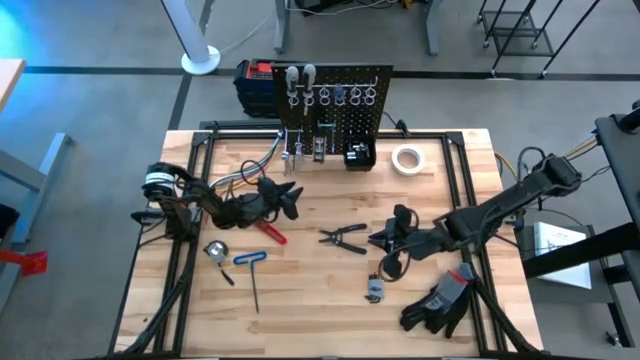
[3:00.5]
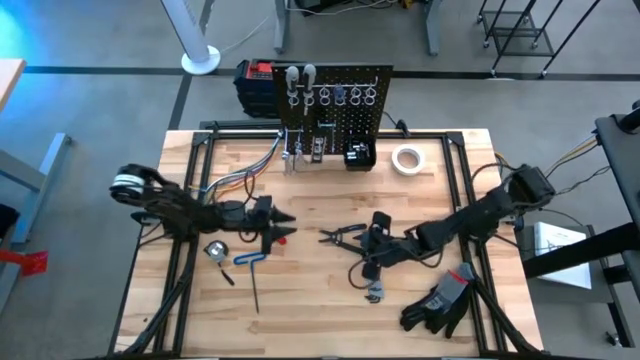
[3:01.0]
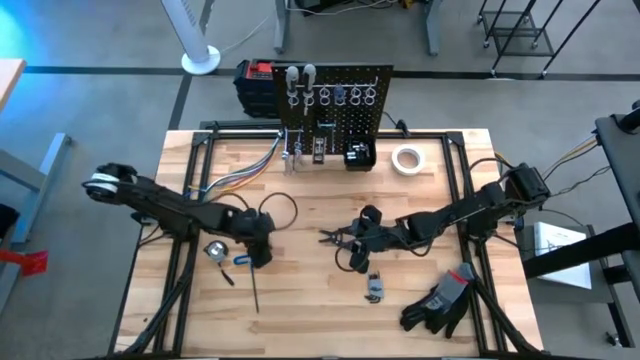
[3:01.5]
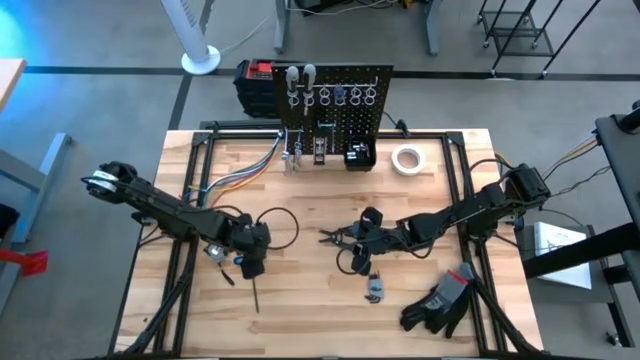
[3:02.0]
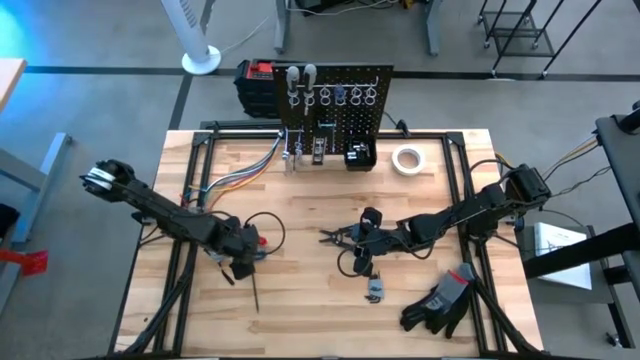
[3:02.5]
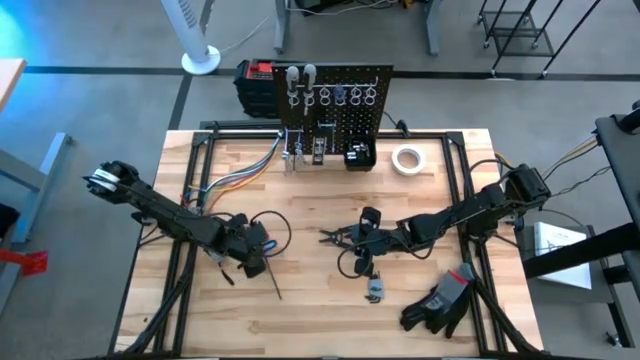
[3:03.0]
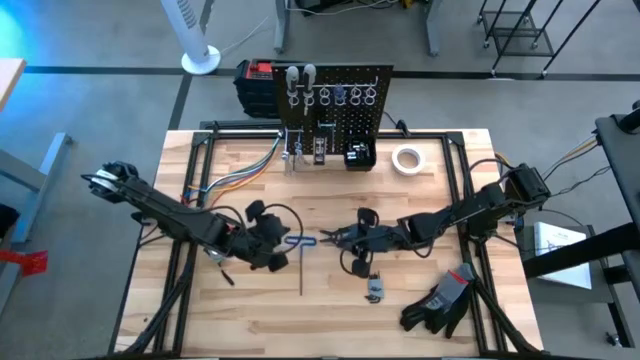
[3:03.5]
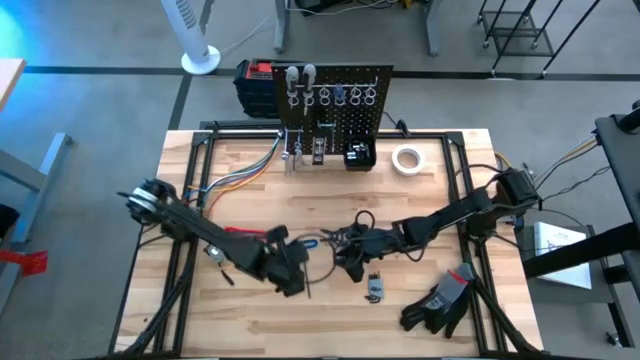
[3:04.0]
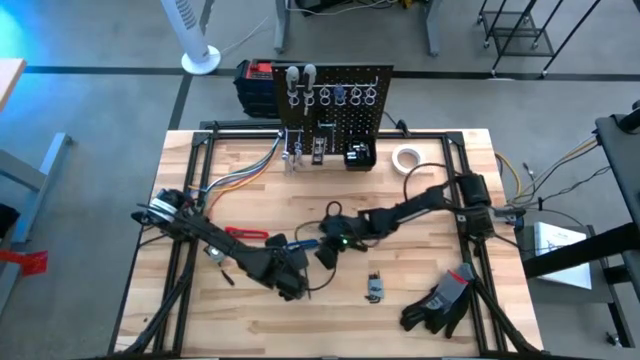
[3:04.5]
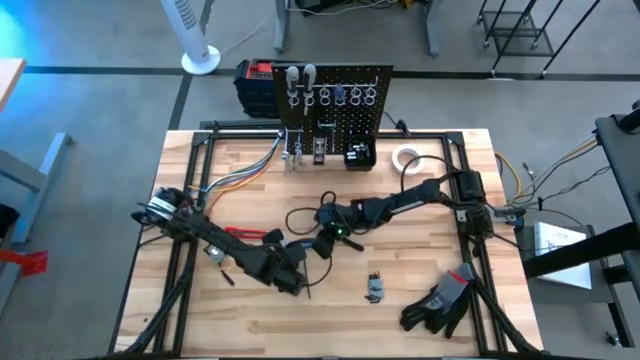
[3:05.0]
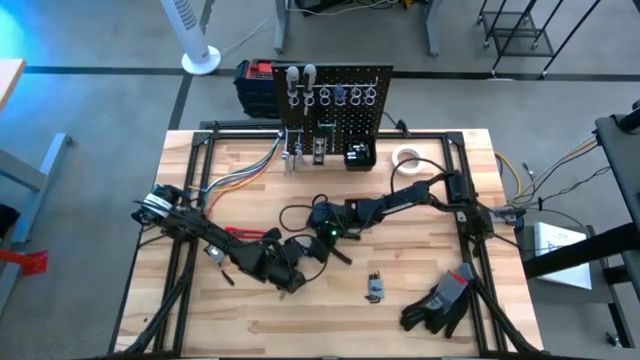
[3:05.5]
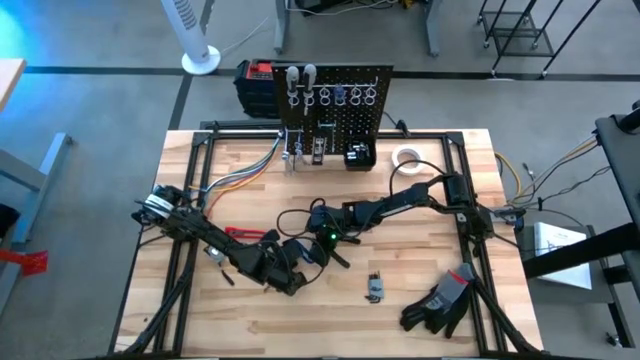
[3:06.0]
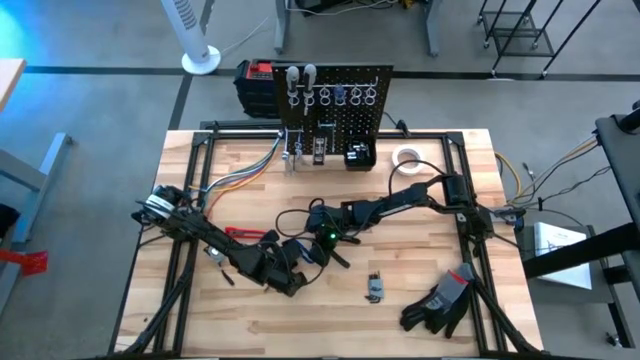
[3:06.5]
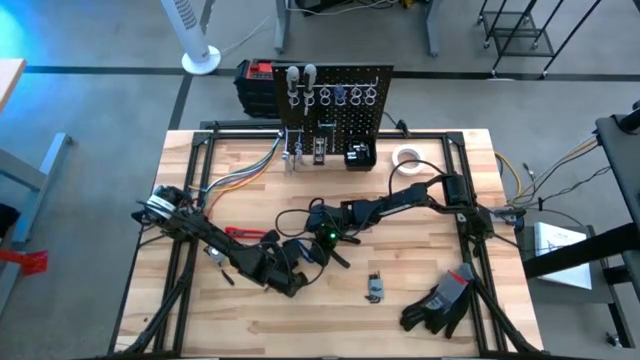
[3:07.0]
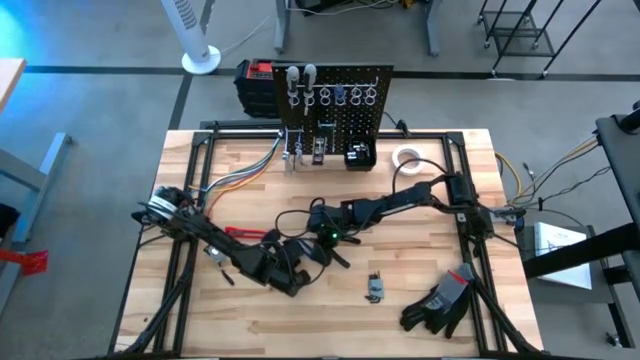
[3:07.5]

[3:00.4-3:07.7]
Task: Hang tools onto peg board
Hang the pick tool on the peg board

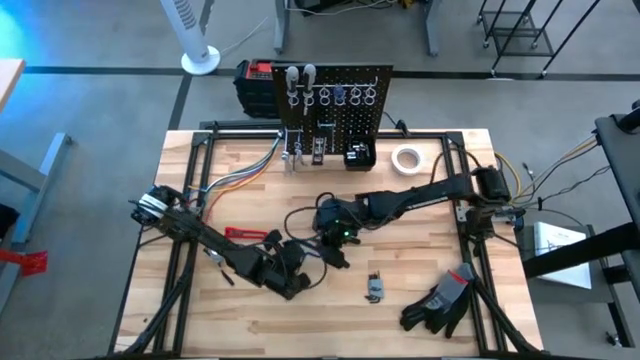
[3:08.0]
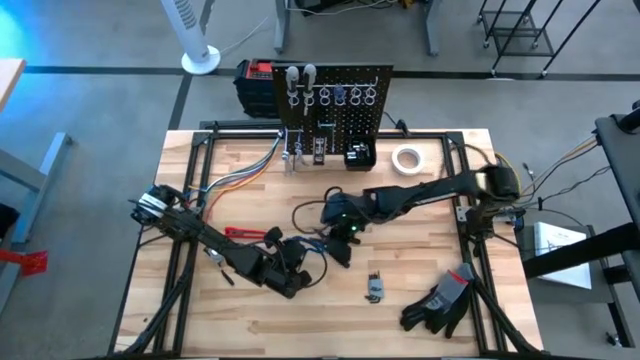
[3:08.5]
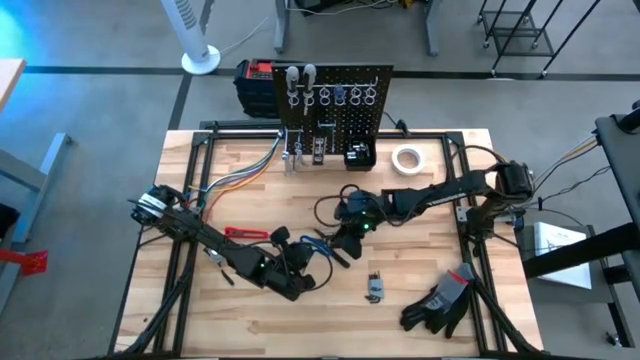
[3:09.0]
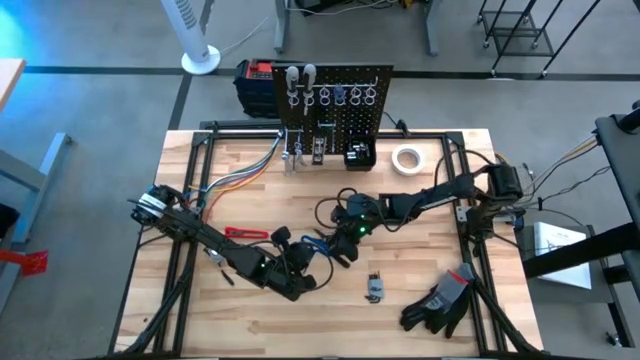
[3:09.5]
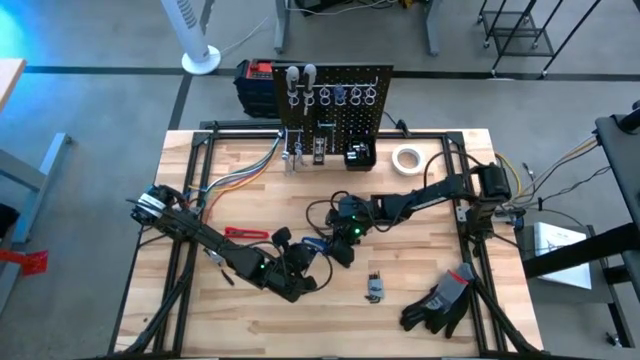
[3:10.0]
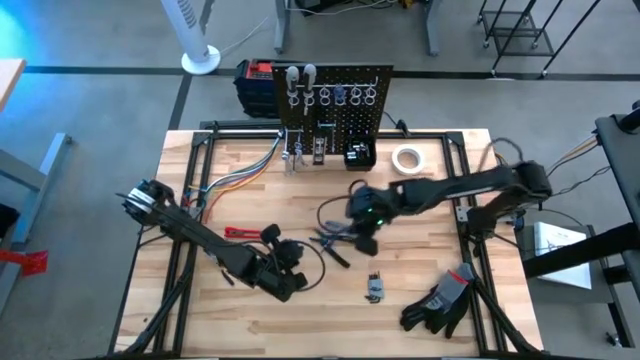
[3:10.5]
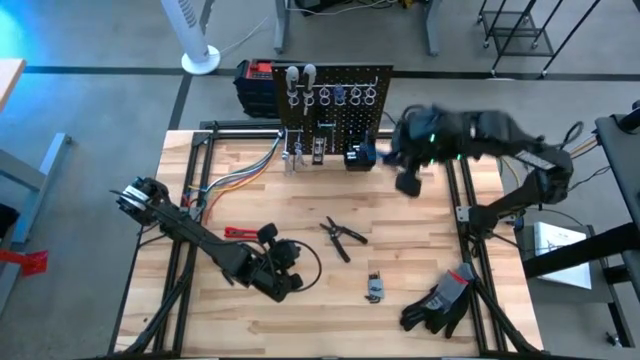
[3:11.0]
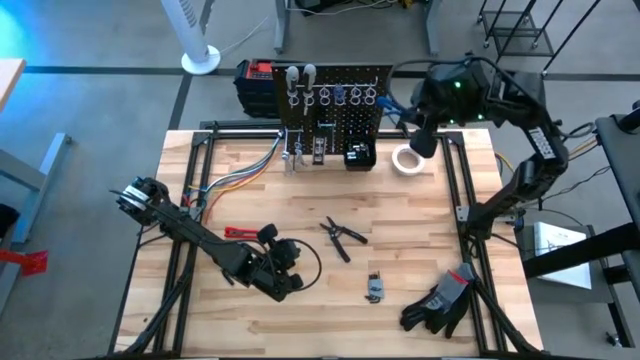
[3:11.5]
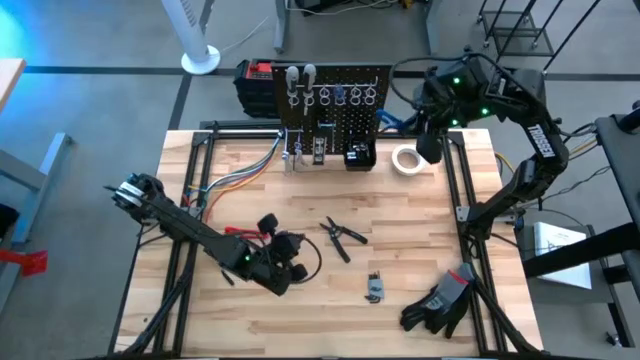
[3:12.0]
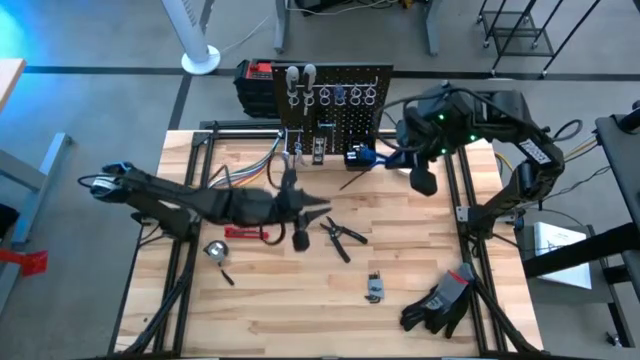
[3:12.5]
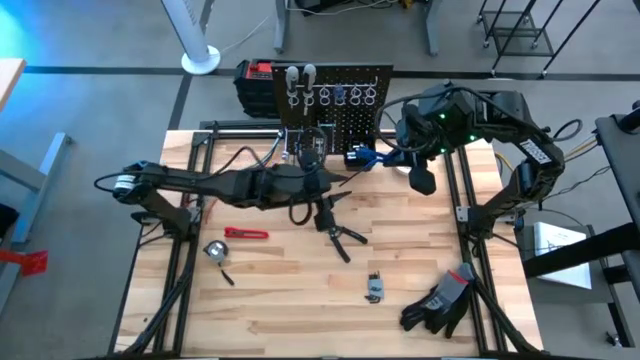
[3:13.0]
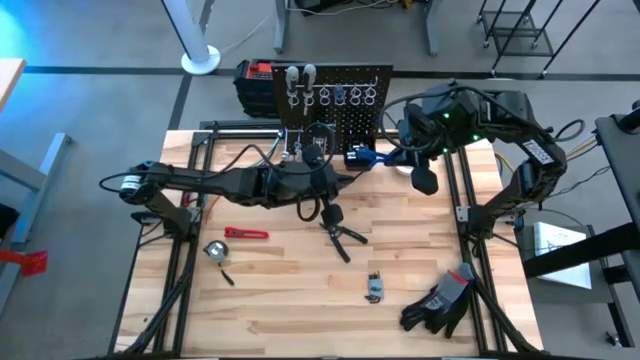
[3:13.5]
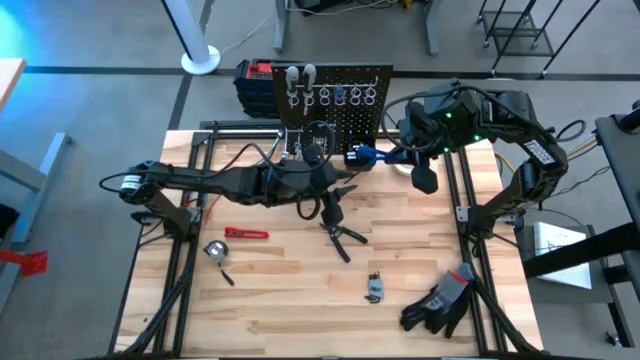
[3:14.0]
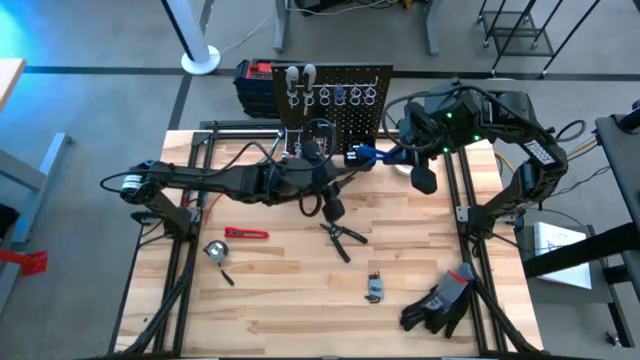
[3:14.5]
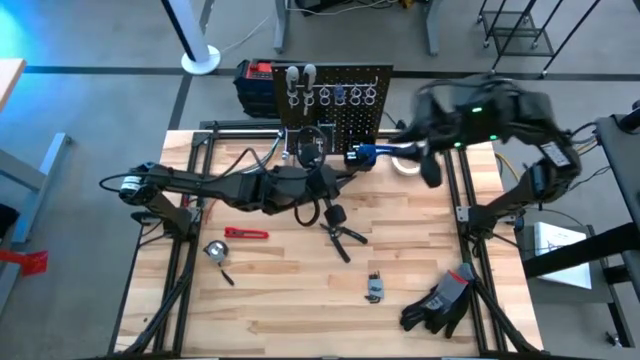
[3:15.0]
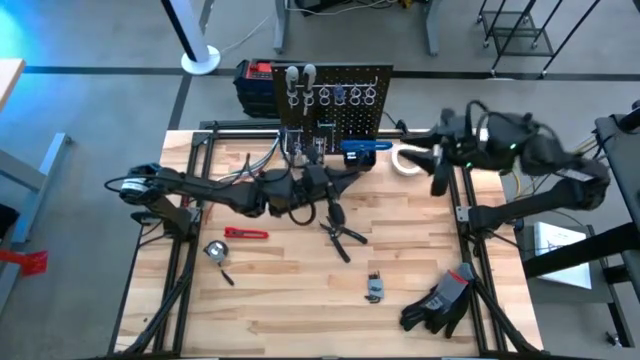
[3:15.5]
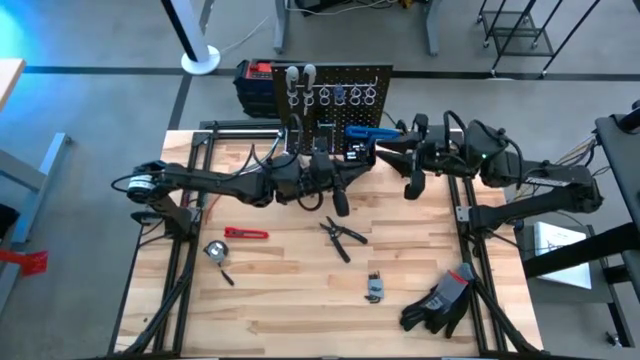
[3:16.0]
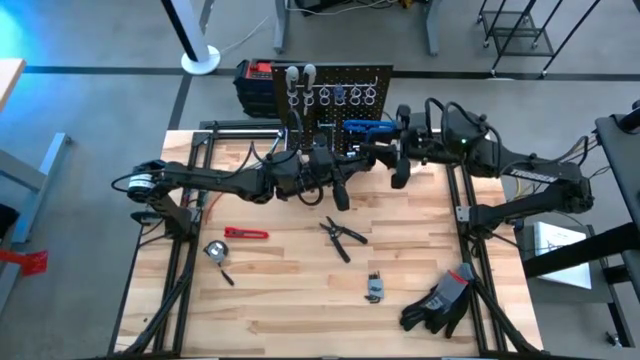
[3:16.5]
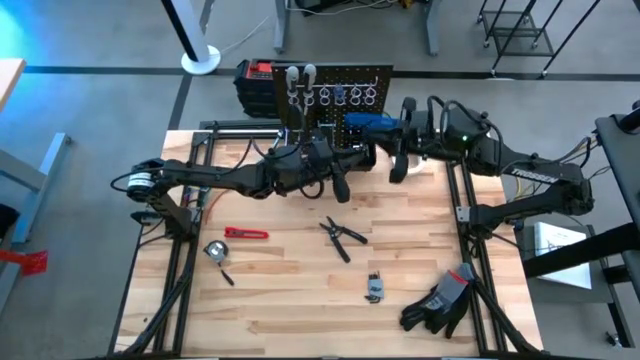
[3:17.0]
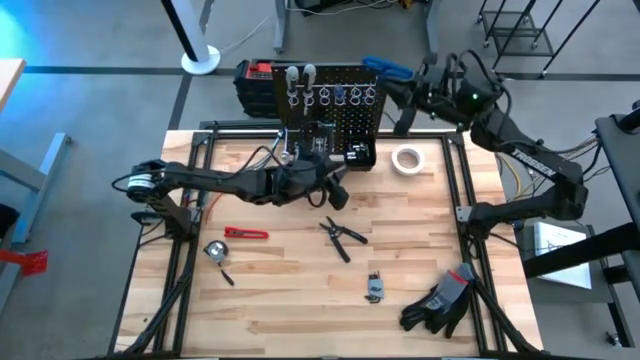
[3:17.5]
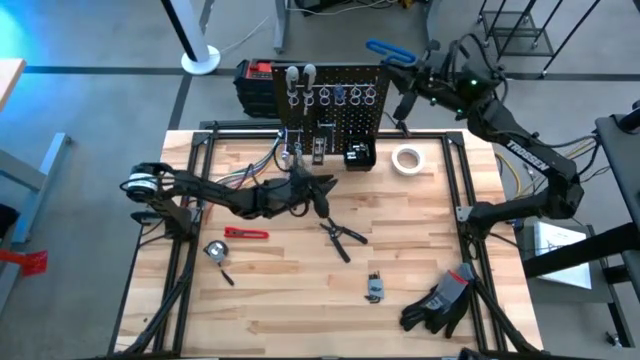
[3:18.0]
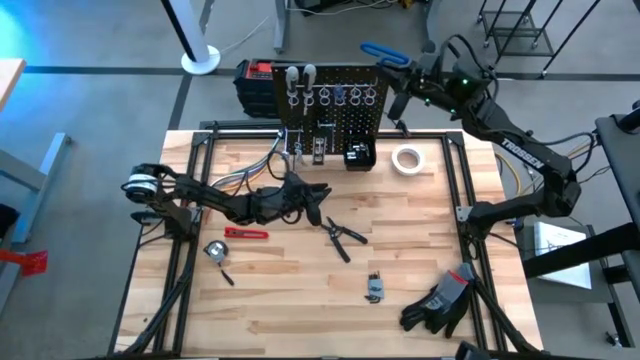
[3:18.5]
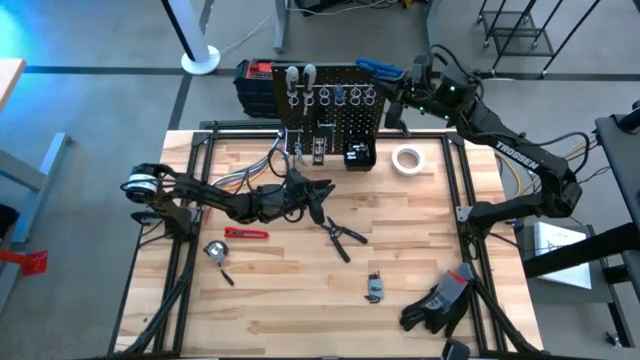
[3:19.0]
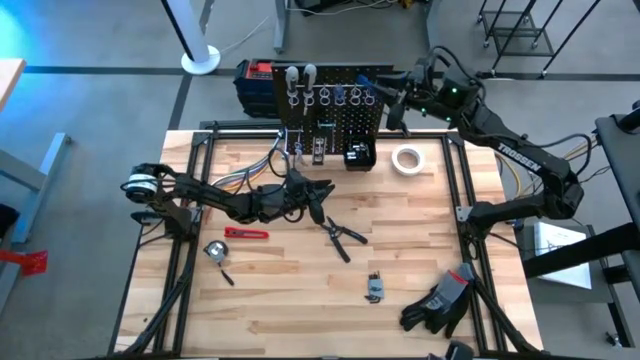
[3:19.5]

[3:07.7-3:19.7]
Hang the pick tool on the peg board

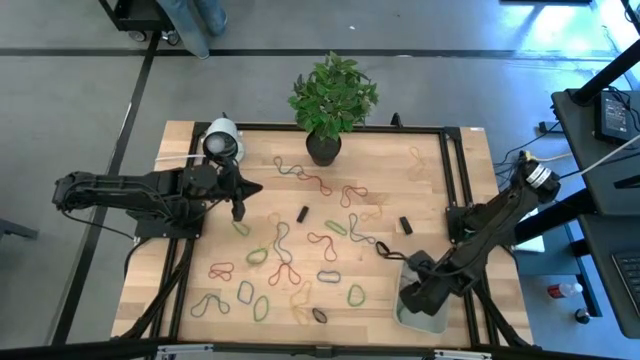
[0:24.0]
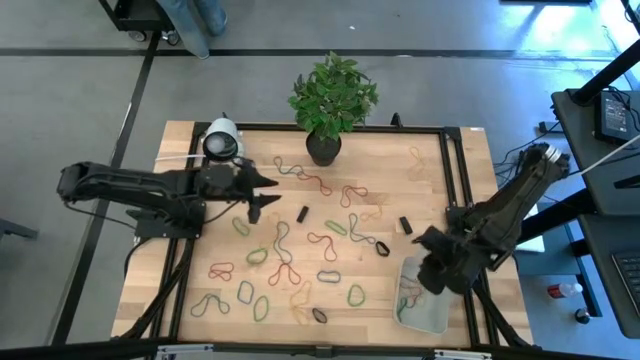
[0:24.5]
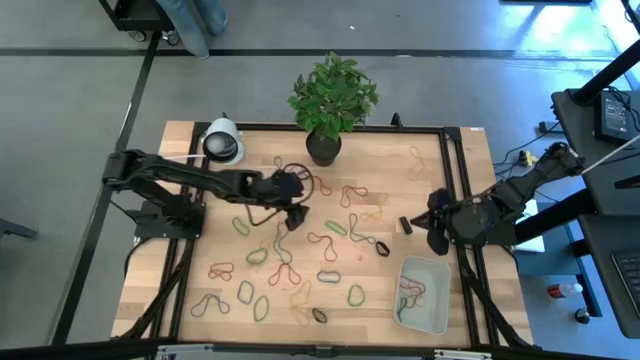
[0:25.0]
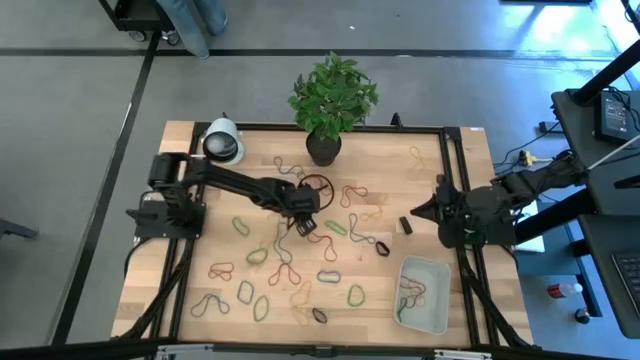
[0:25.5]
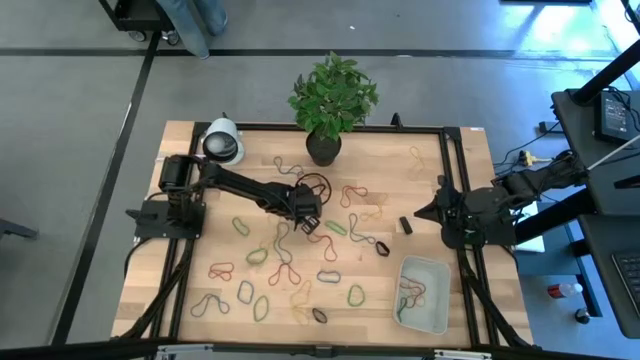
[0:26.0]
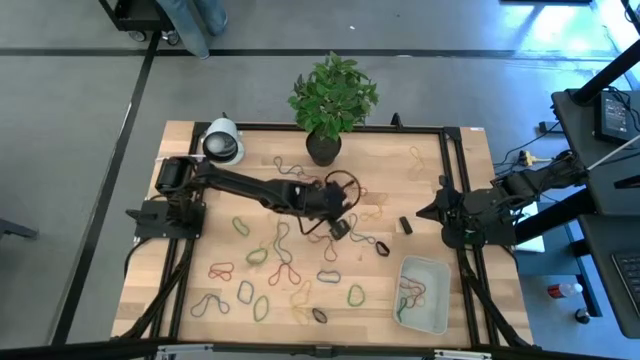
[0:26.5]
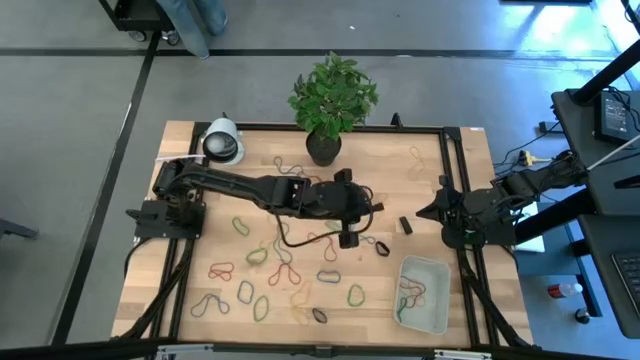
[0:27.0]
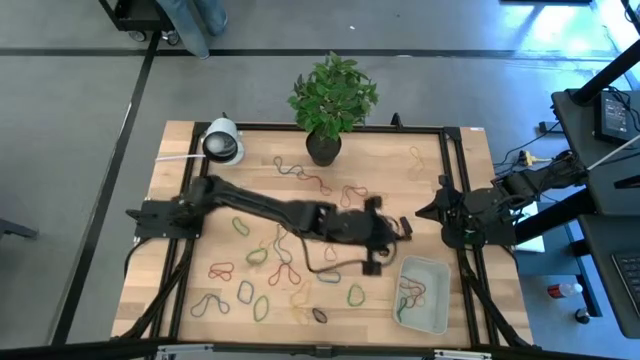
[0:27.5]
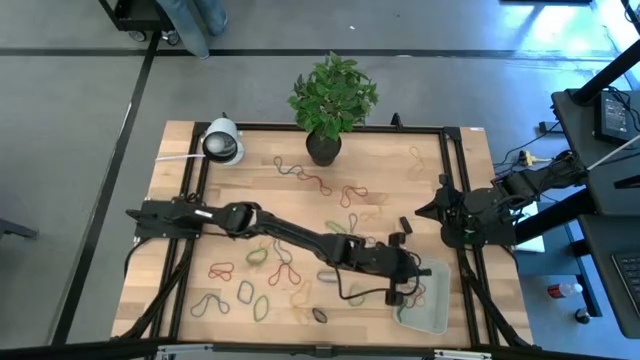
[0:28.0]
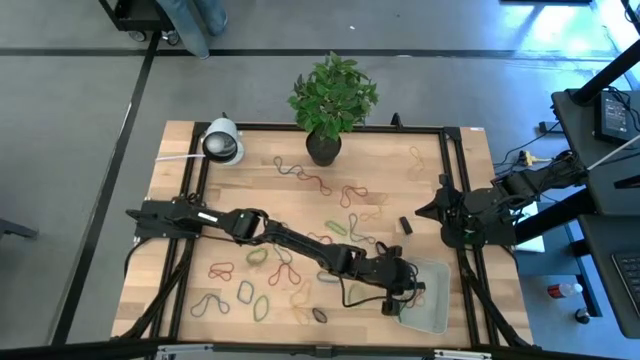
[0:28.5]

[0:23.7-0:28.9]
Task: Pick and place rubber bands into bin
Put the black rubber band into the gray bin
